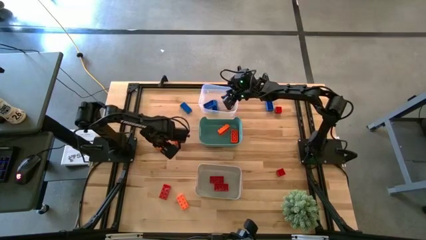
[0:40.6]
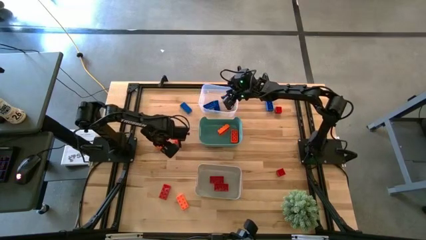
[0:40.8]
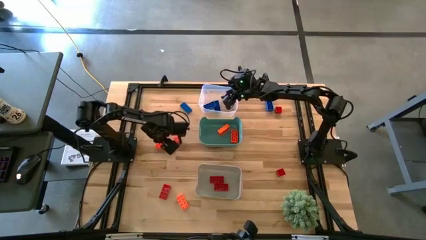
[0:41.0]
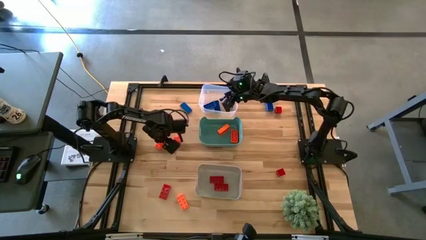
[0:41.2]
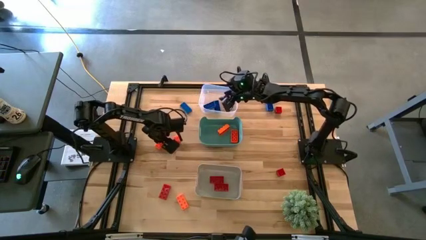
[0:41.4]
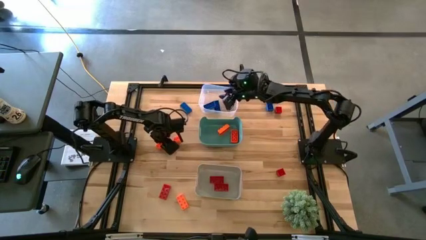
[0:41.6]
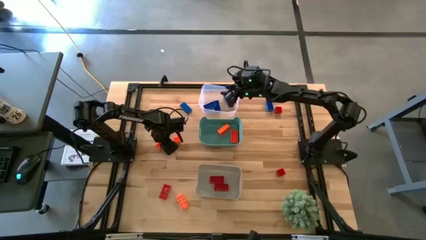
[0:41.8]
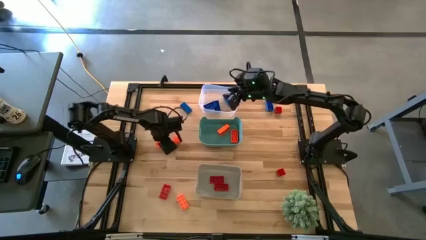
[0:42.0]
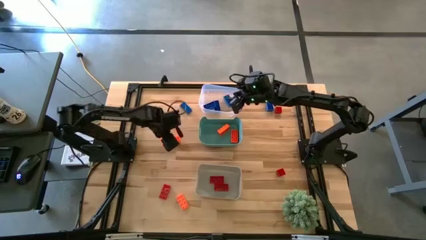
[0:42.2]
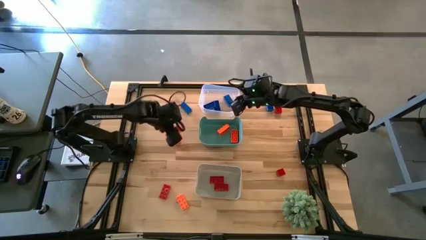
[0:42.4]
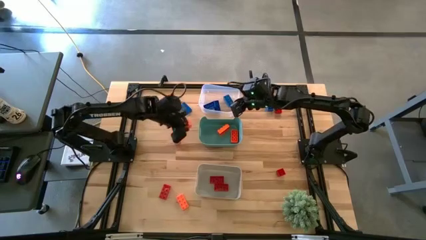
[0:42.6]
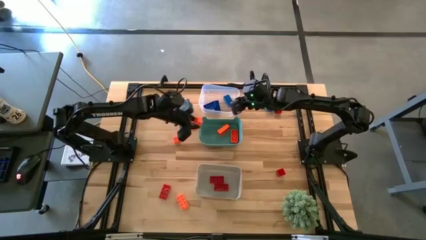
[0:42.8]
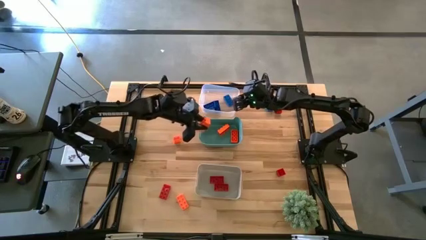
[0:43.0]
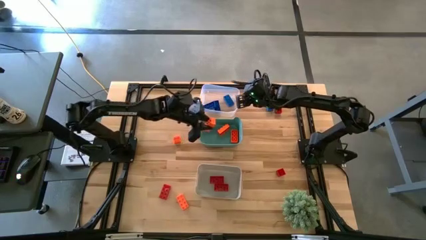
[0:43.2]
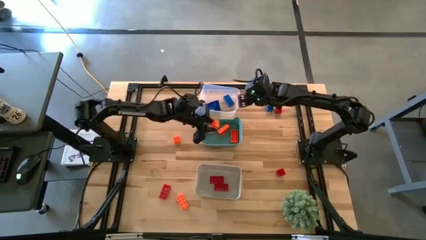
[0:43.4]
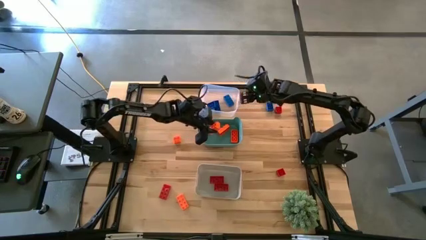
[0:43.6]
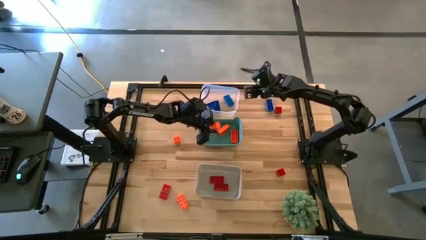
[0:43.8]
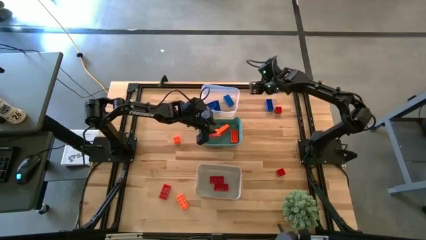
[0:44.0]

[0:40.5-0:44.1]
Task: Sort & place blocks by color
Put the orange game piece into the green bin

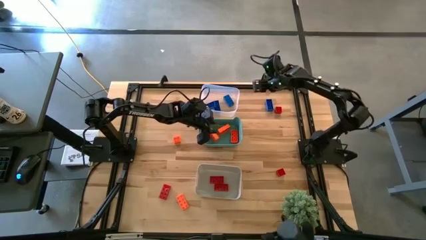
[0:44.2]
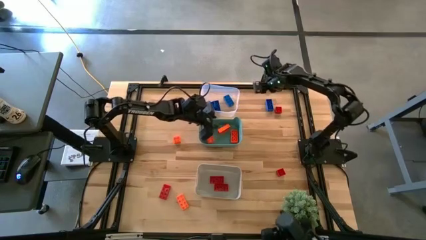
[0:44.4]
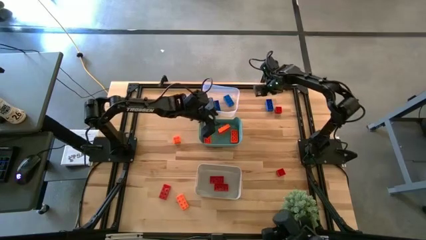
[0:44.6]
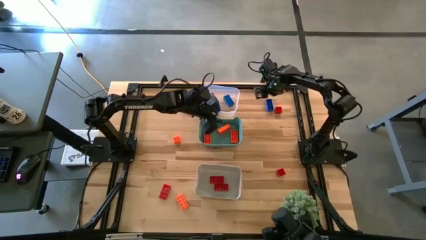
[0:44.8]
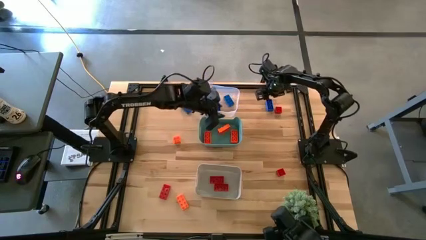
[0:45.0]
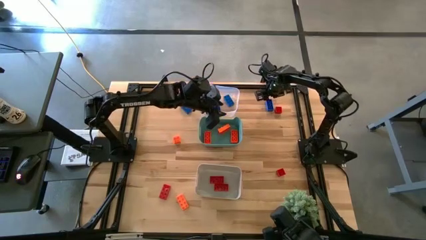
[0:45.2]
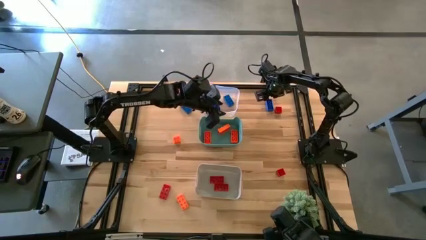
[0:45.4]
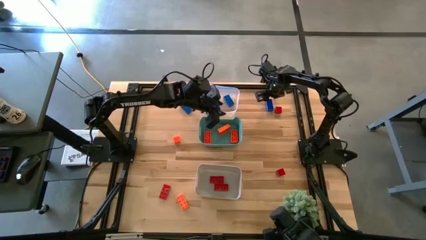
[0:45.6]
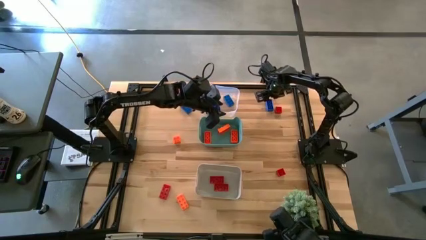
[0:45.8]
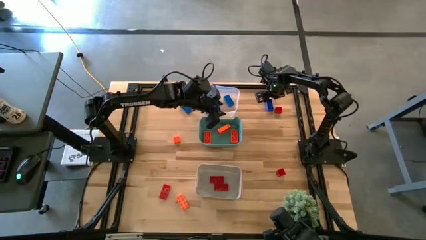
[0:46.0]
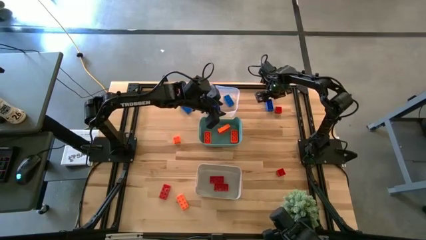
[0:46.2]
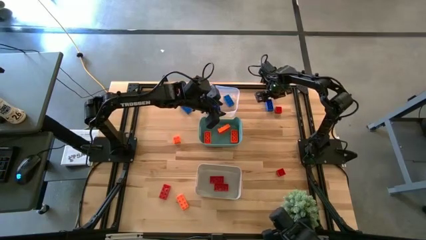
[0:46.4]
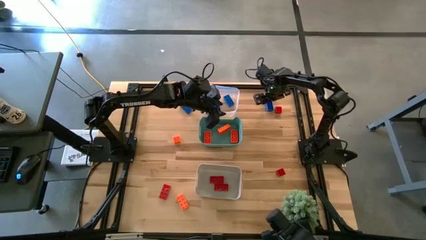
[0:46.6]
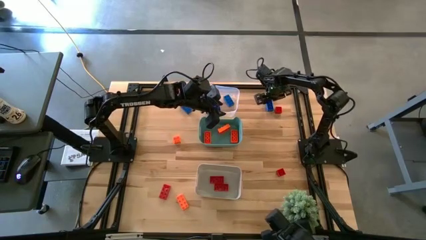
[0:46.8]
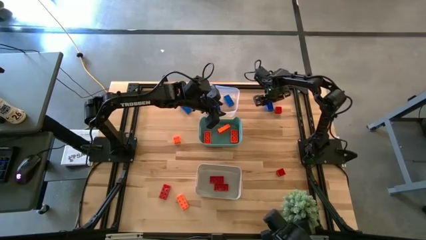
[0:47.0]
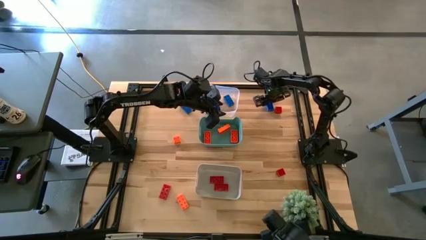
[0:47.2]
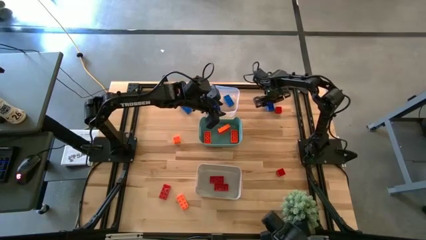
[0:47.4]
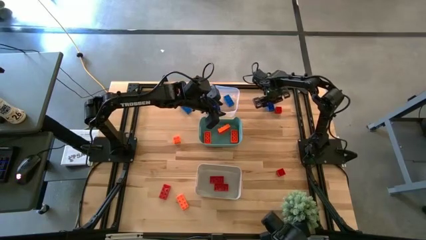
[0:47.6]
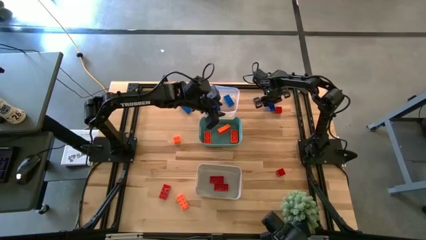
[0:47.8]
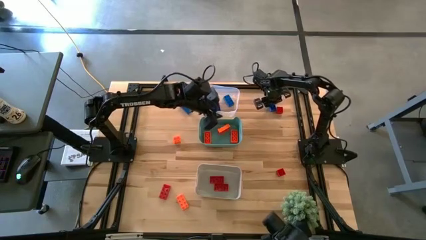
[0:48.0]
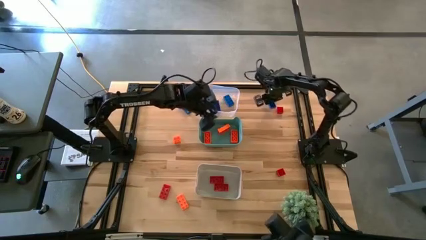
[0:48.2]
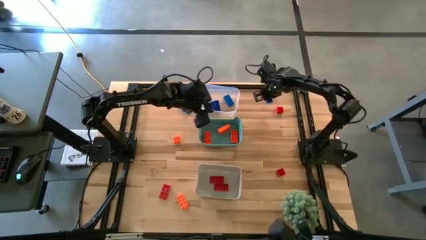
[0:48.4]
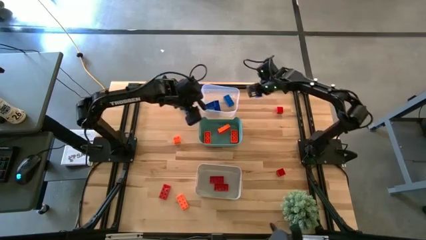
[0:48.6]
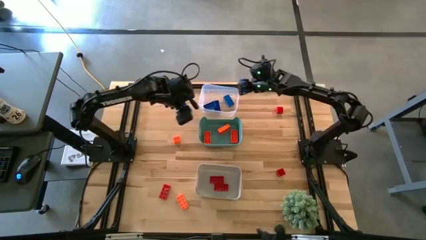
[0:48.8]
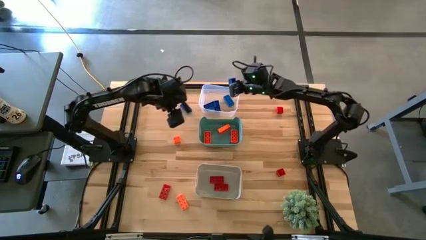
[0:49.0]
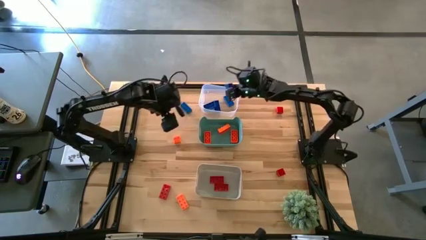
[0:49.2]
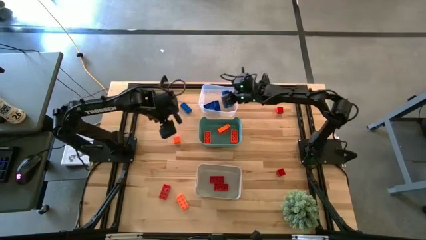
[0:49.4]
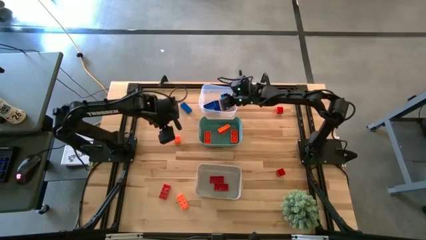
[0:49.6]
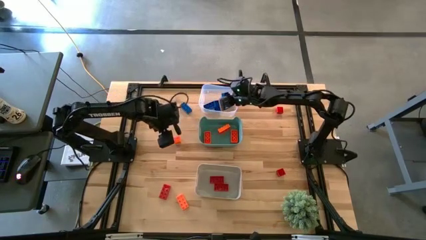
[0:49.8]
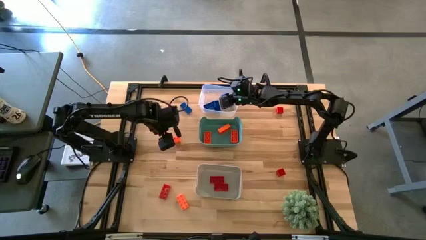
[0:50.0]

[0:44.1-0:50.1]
Put the blue game piece into the transparent bin

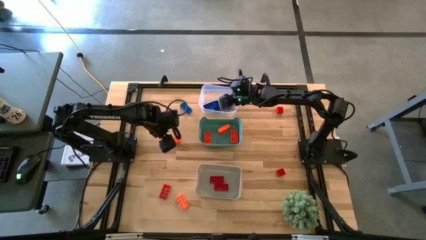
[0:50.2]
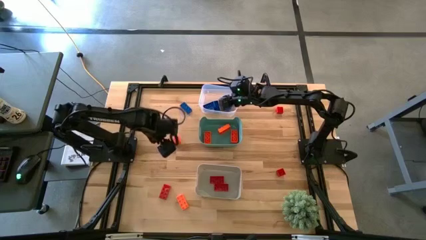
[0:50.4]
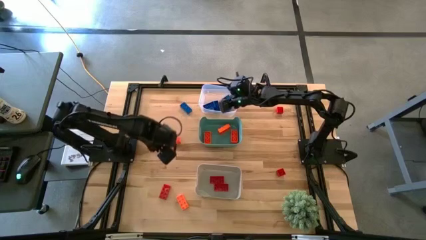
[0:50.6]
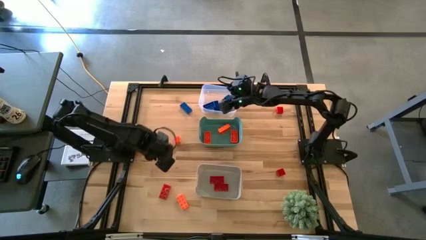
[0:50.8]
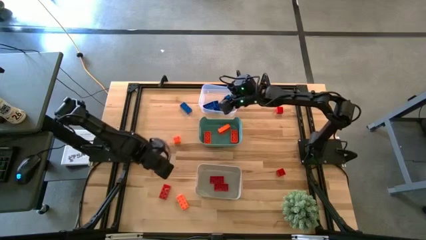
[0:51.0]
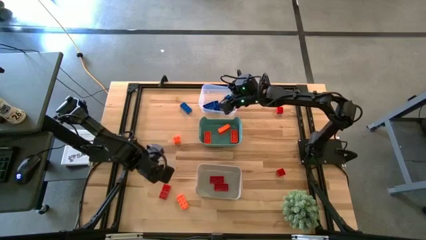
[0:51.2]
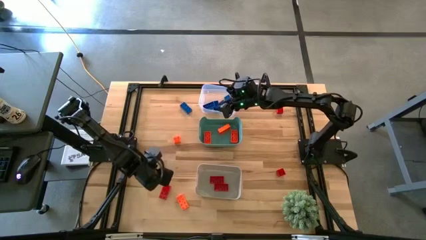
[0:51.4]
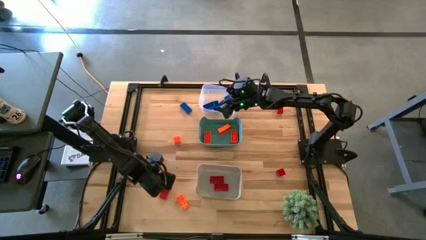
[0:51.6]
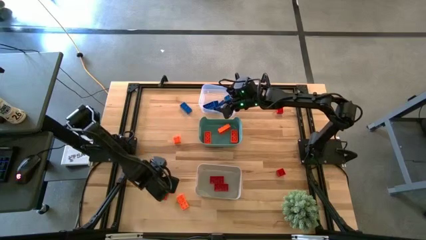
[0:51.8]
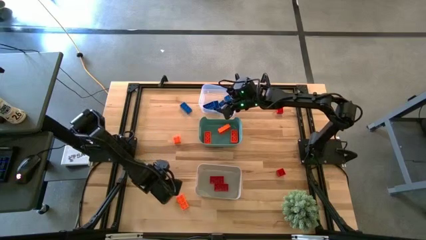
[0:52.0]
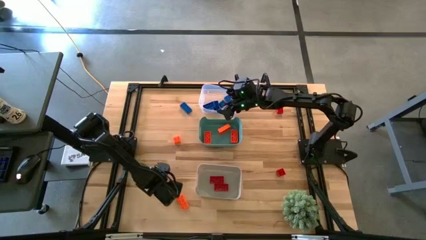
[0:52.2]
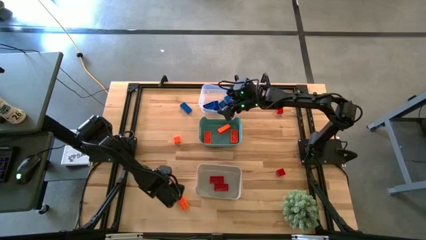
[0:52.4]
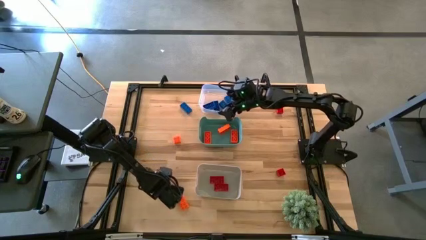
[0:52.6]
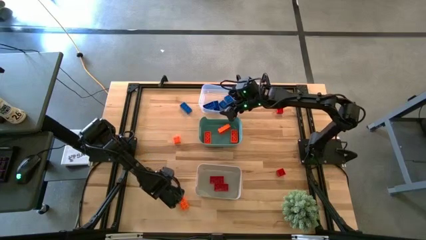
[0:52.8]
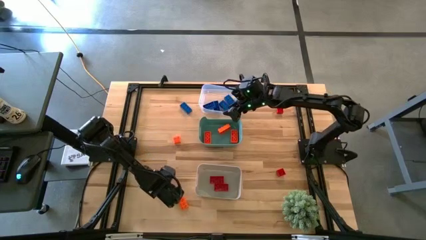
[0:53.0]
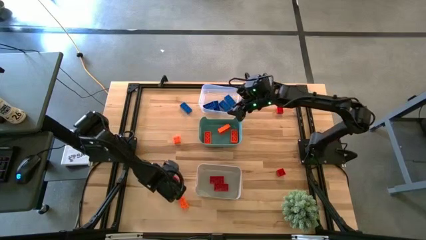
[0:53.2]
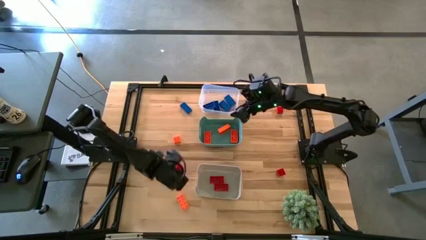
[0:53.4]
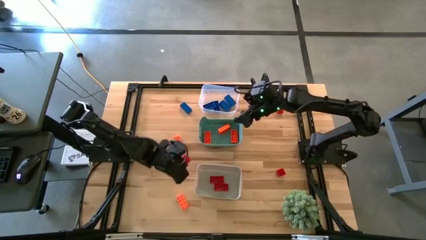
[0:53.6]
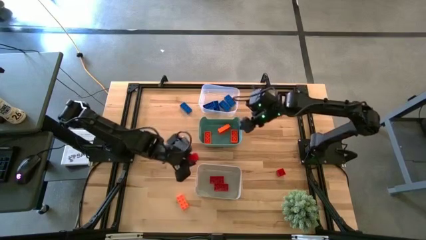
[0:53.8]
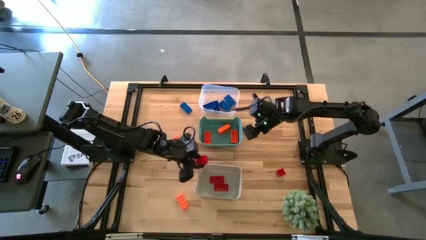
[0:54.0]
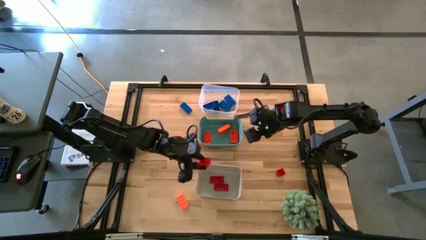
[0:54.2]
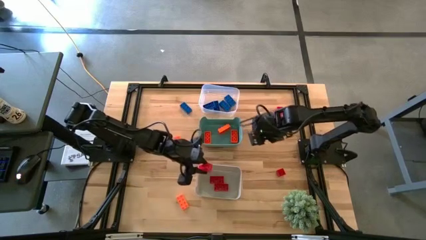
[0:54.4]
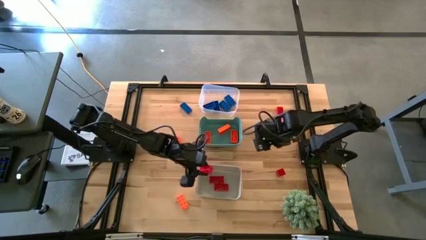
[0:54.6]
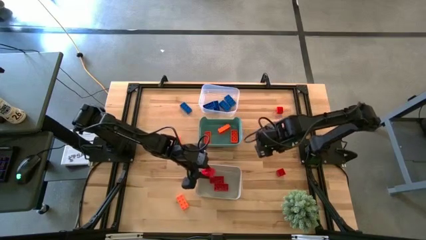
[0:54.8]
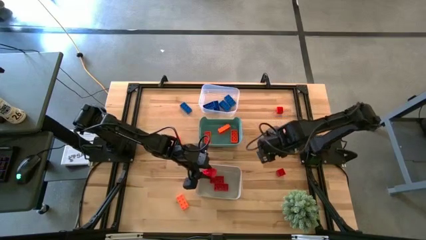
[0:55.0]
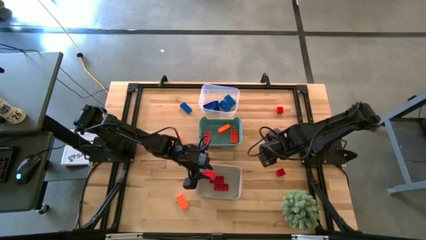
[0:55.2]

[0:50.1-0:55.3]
Put the red game piece into the white bin

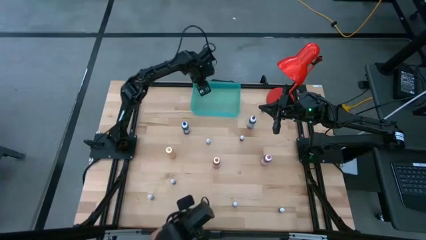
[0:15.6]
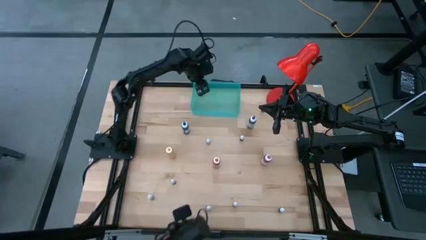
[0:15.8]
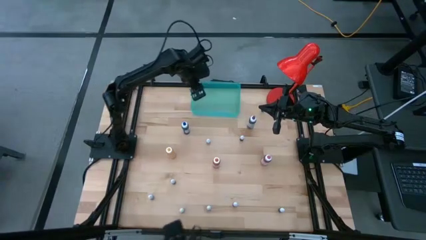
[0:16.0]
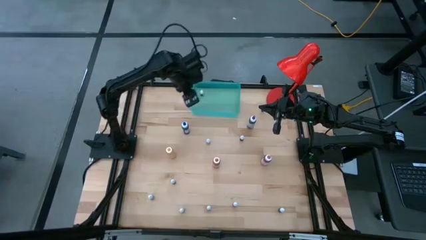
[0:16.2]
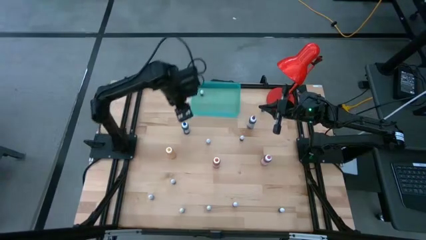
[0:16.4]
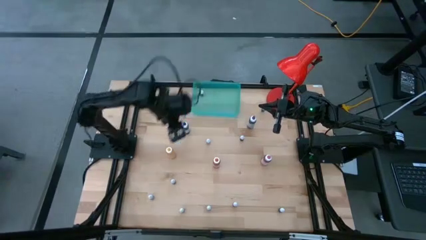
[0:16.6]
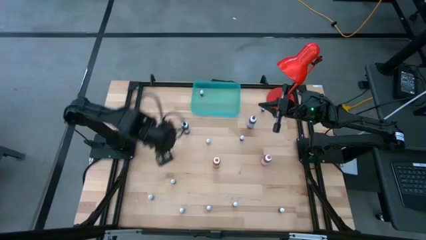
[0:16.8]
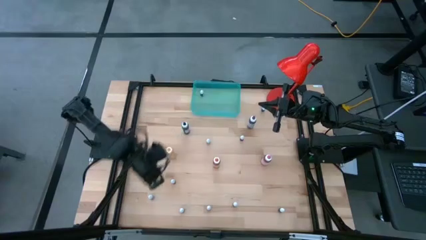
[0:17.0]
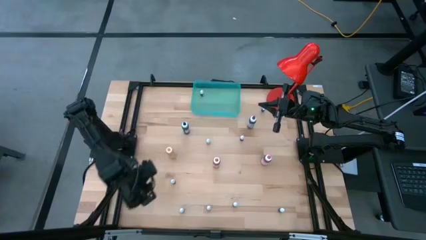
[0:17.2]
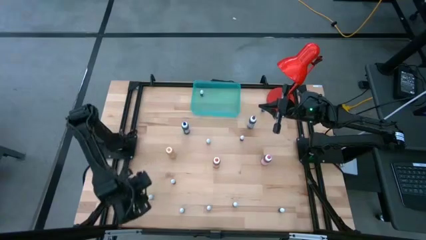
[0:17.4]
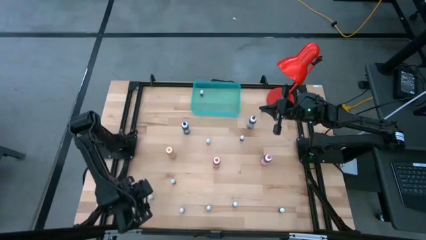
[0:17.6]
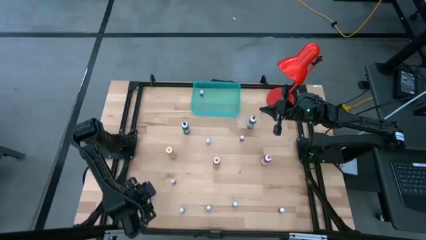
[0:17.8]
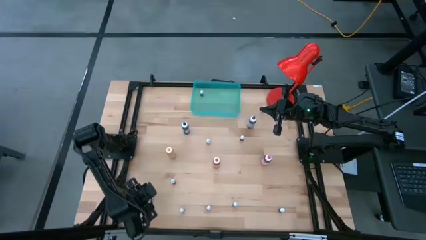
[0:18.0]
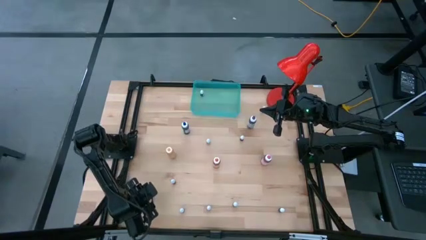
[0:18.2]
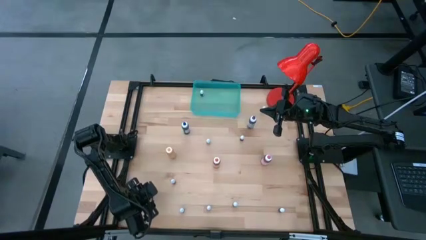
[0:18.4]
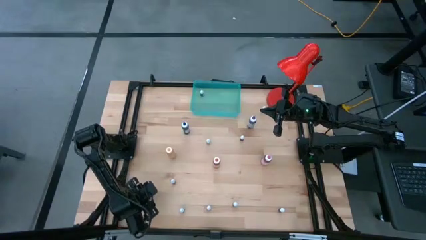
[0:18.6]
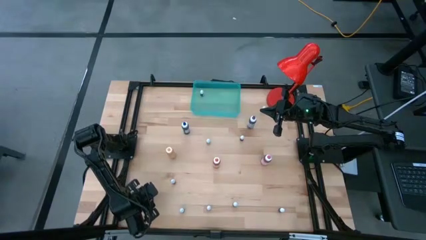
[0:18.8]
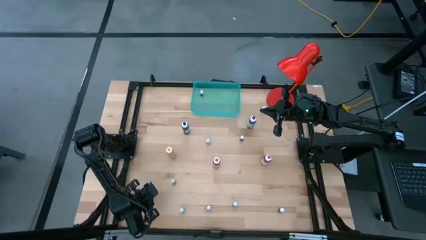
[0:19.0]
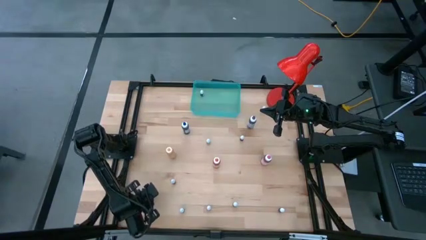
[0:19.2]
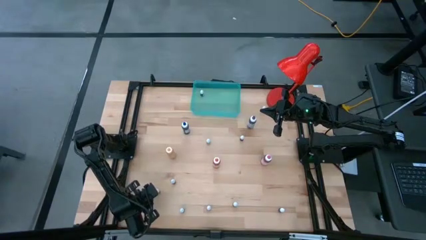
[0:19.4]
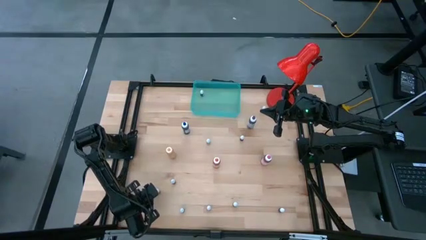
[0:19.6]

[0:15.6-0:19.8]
Task: Pick & Place food coloring
Put the bottom left black food coloring bottle into the bin
